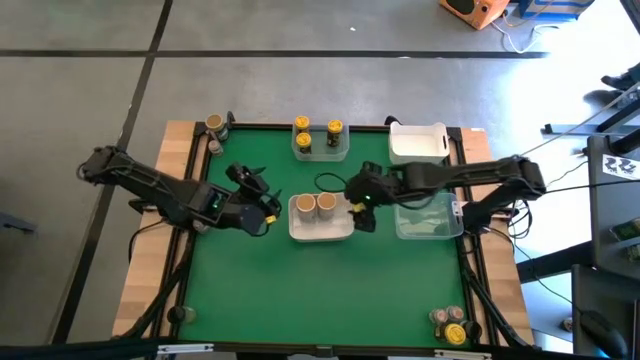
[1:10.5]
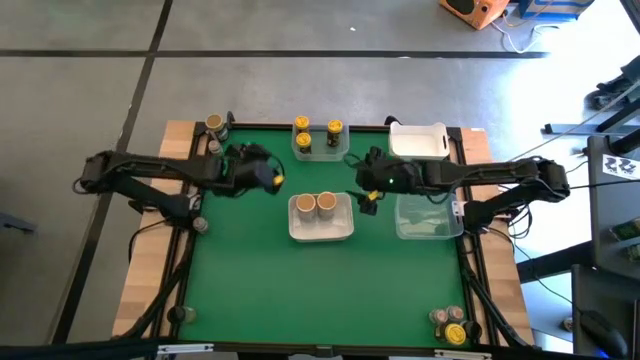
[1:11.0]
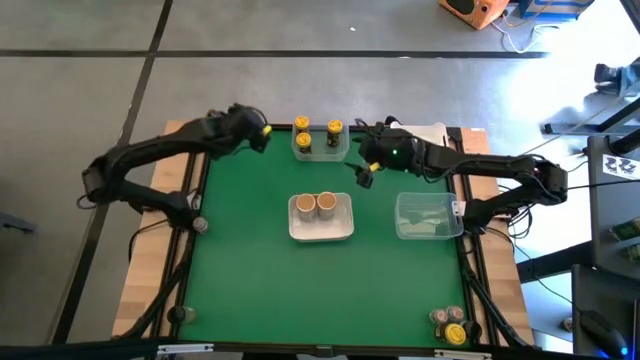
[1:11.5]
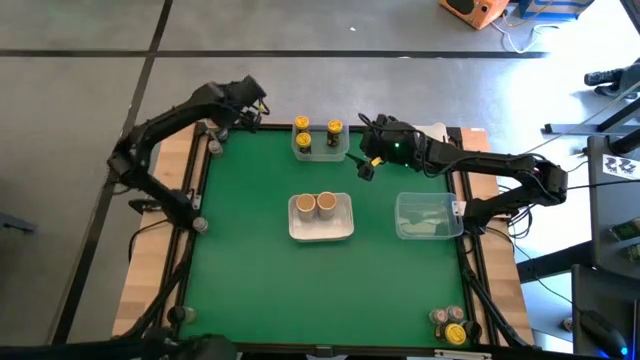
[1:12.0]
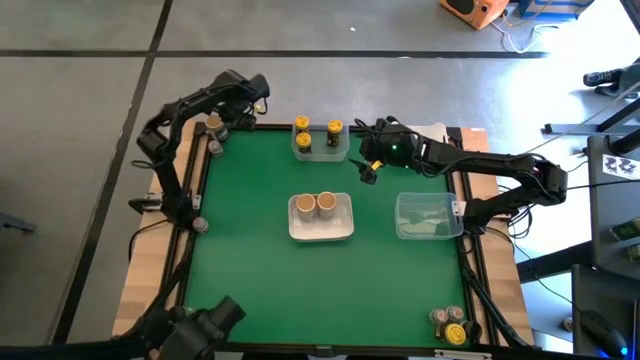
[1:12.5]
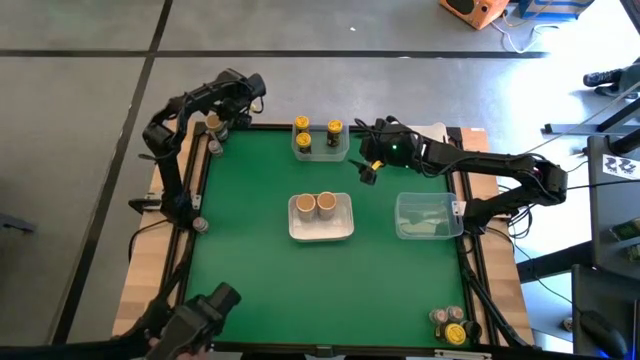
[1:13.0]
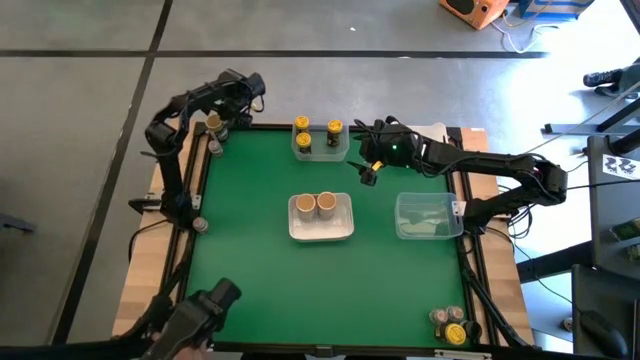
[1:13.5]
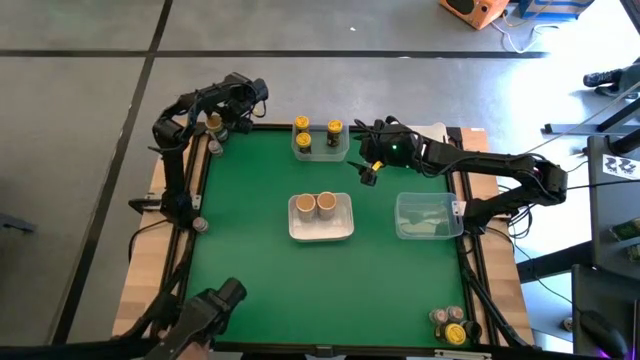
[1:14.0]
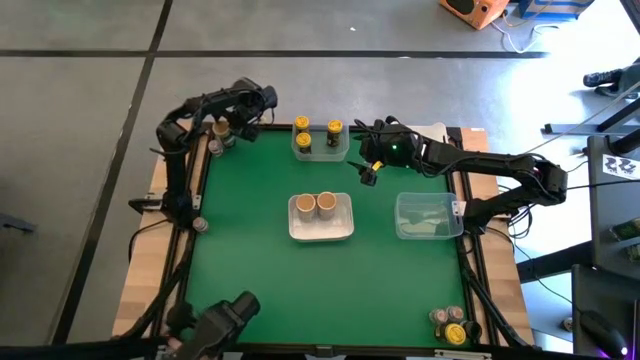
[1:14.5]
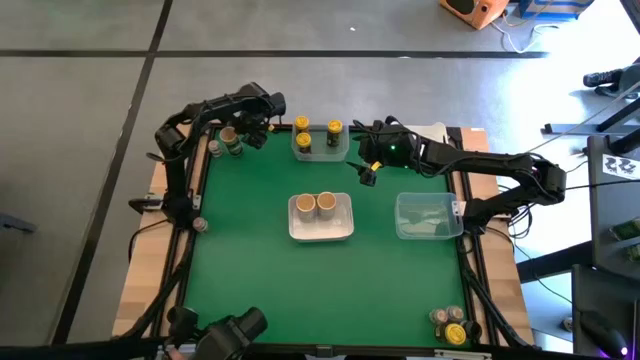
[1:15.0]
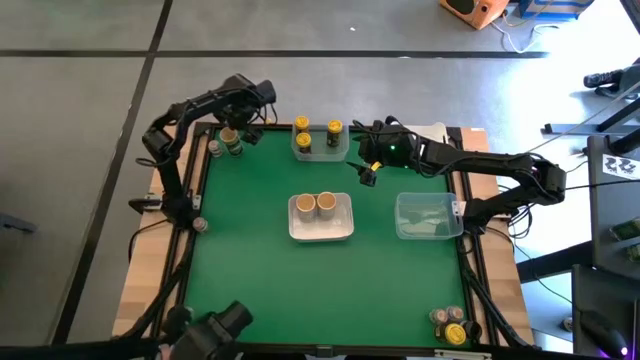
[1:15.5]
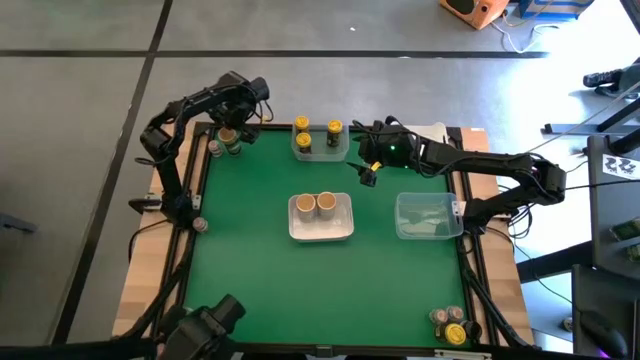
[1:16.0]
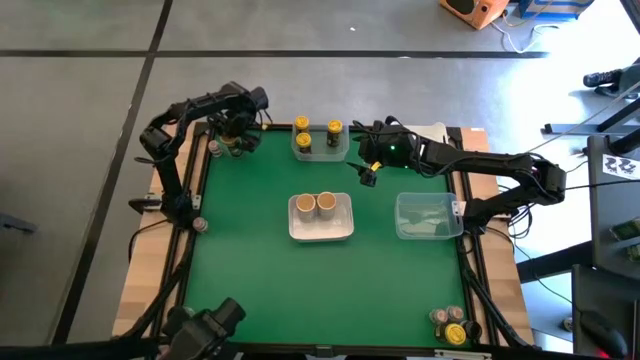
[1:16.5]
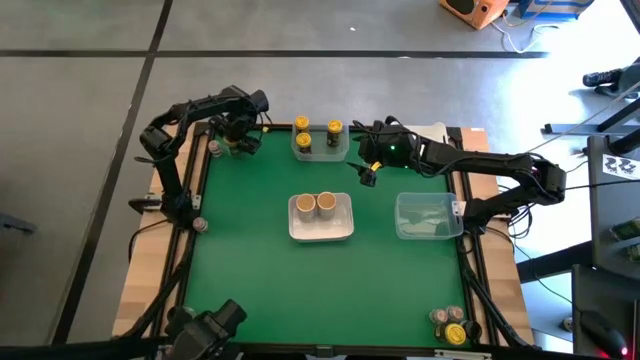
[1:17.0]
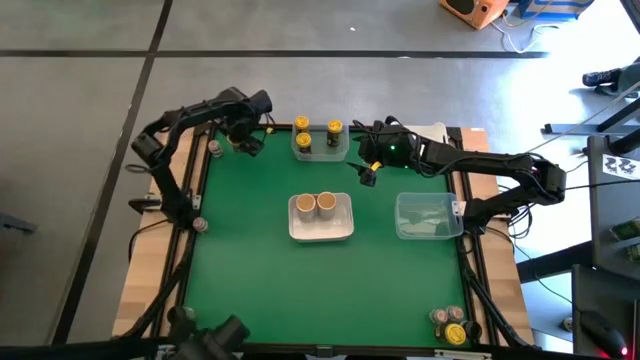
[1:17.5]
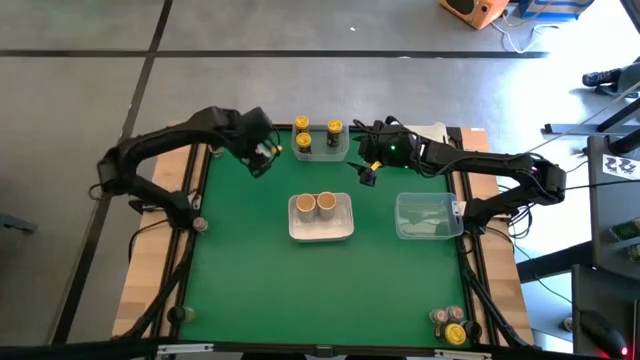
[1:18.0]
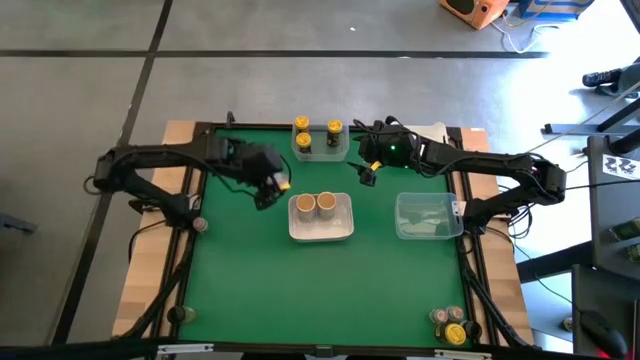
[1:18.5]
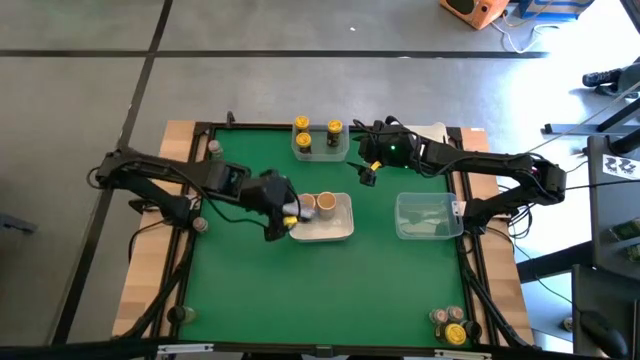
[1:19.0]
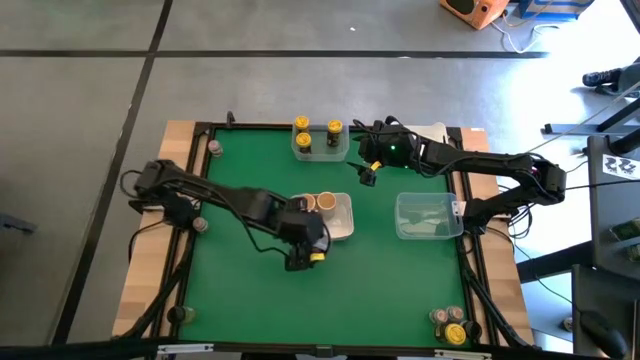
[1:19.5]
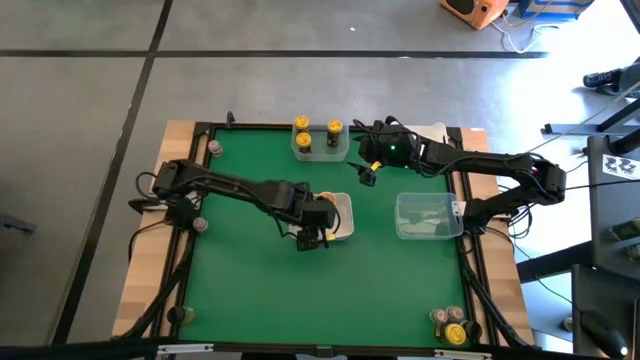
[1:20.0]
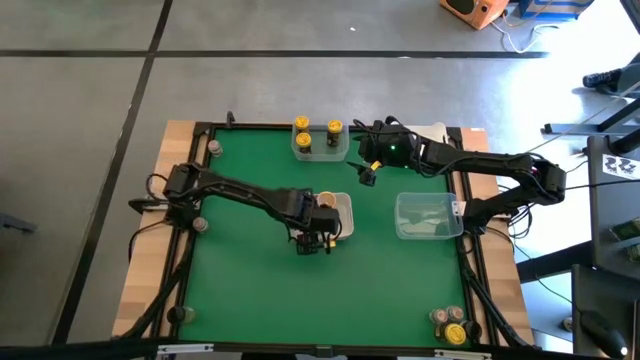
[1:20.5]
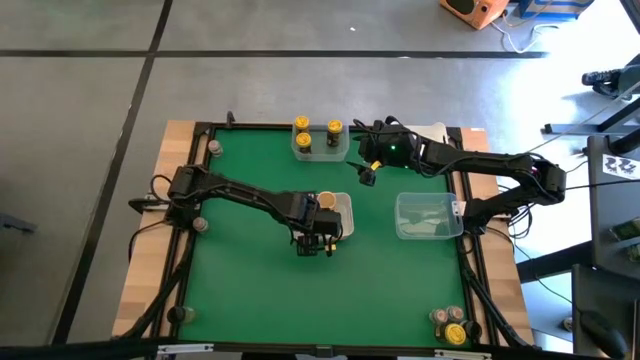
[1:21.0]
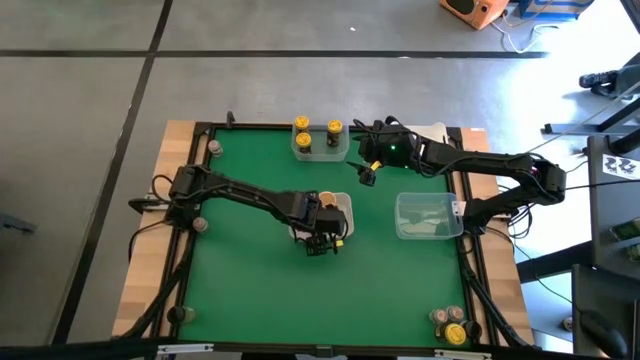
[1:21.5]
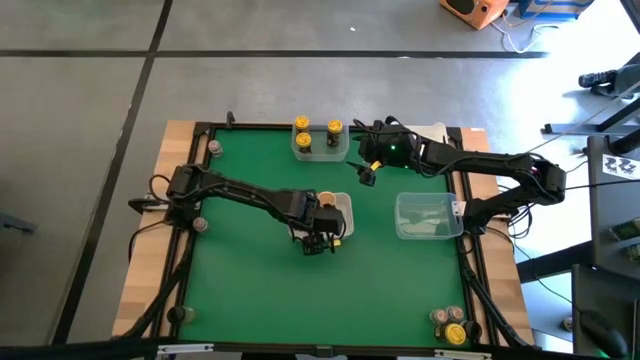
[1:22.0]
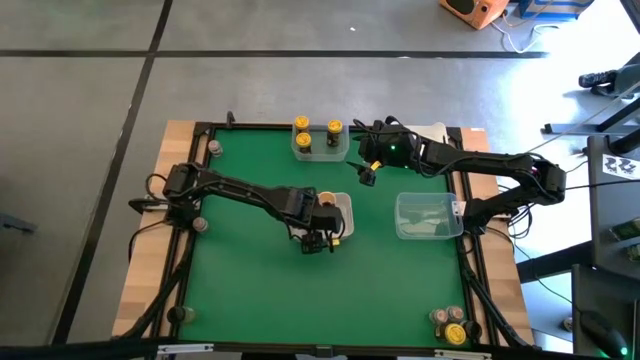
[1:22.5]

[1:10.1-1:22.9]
Task: Sort spices by type
Put the gold seasoning bottle into the bottom white bin

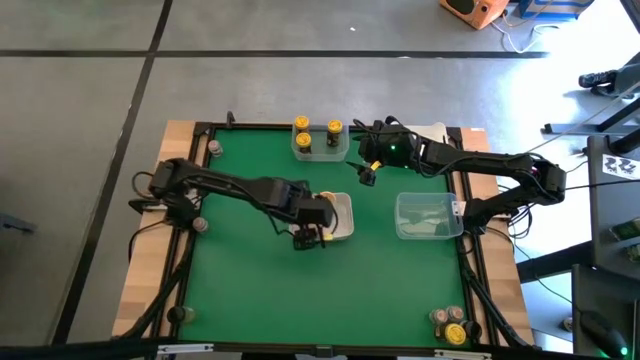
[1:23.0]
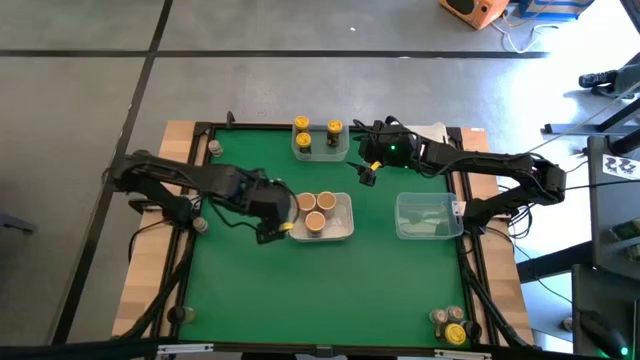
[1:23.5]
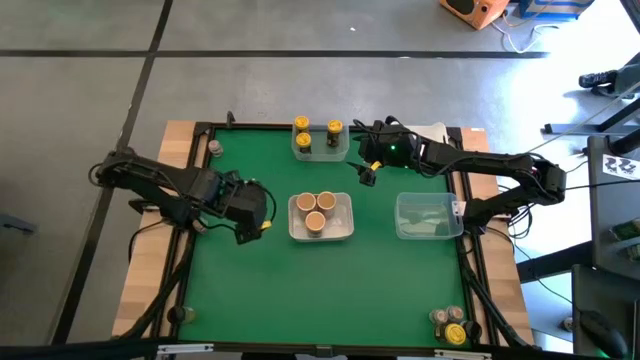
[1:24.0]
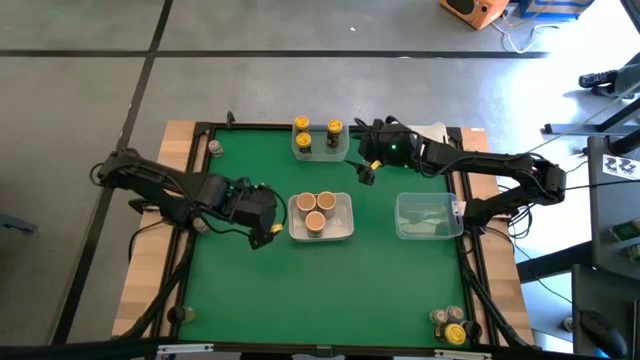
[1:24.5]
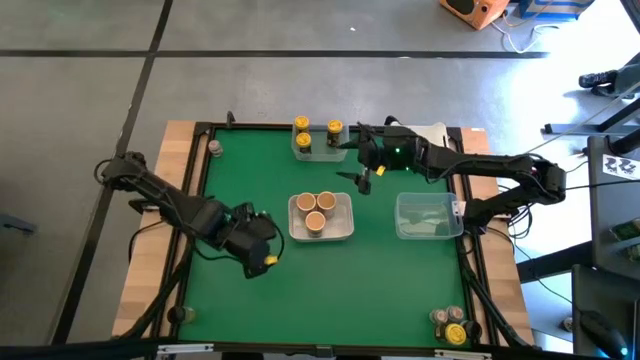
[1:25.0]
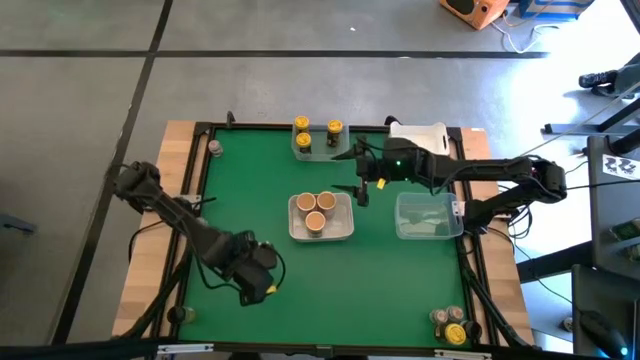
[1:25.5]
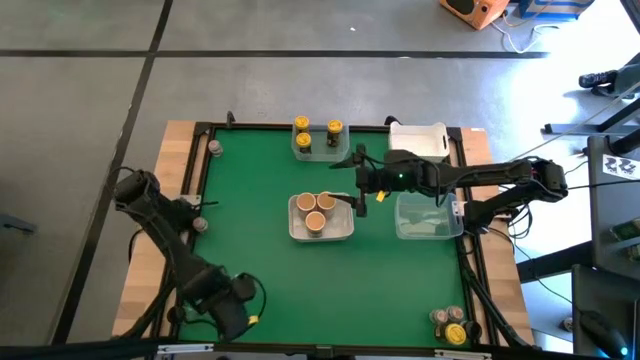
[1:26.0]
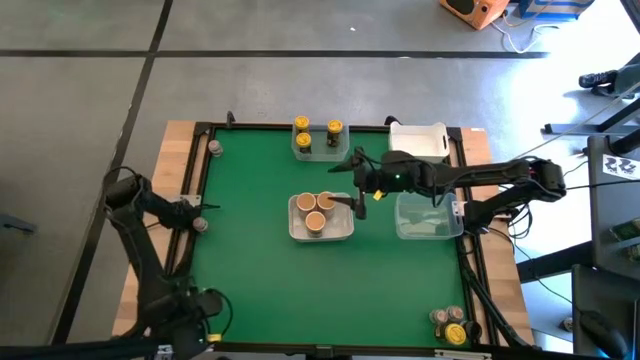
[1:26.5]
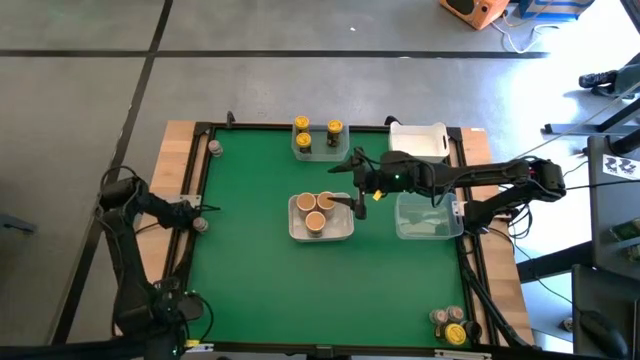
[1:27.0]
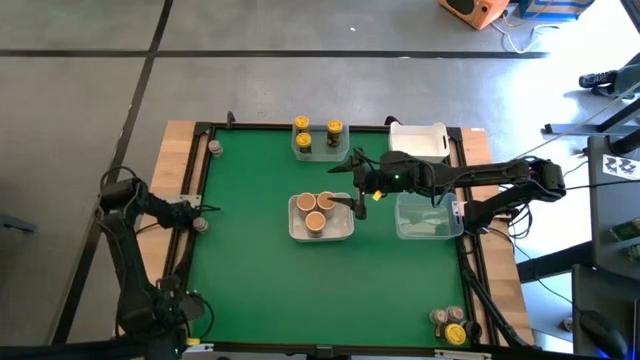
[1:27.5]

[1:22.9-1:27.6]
Put the left black seasoning bottle into the top white bin

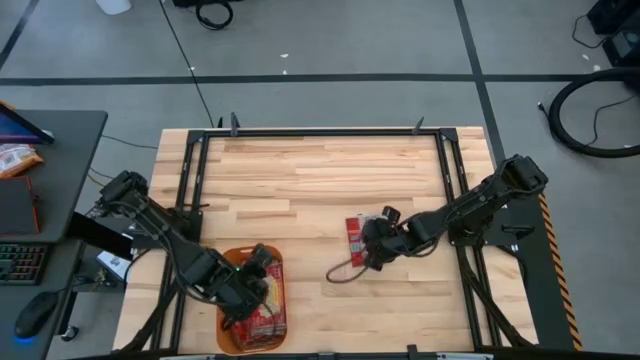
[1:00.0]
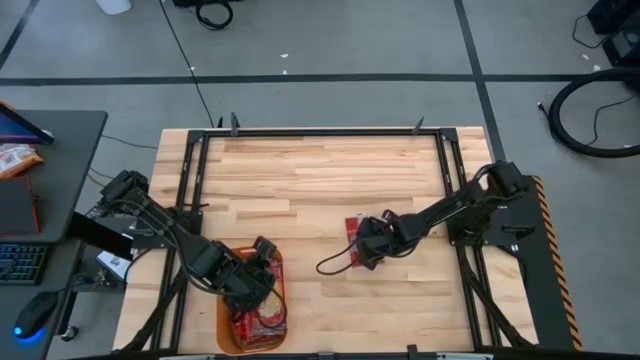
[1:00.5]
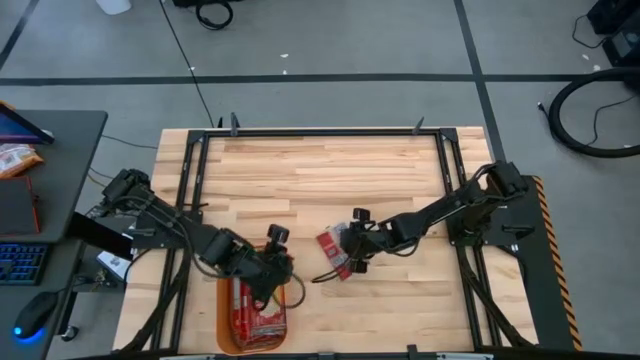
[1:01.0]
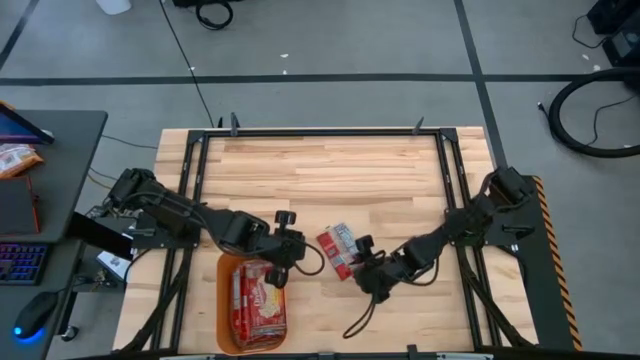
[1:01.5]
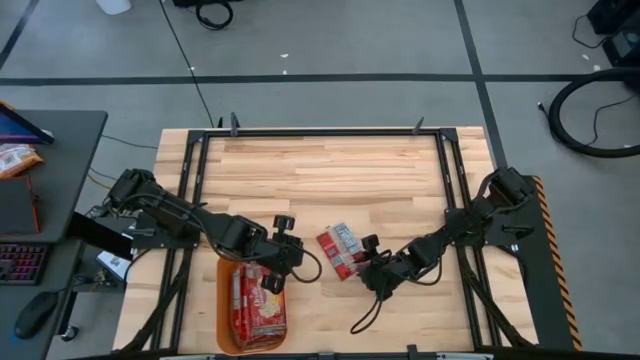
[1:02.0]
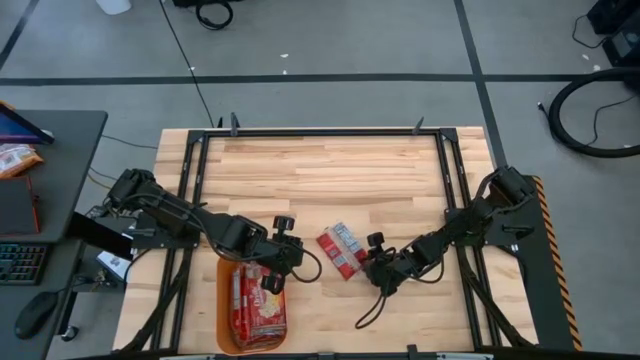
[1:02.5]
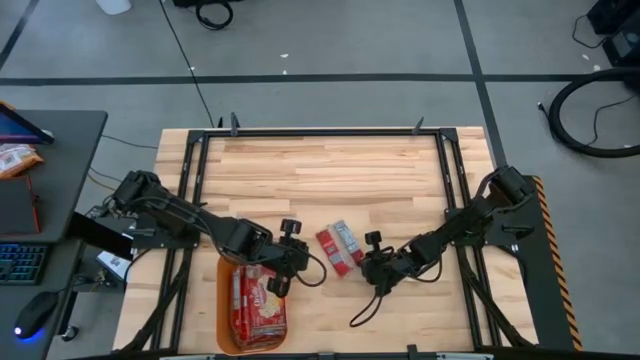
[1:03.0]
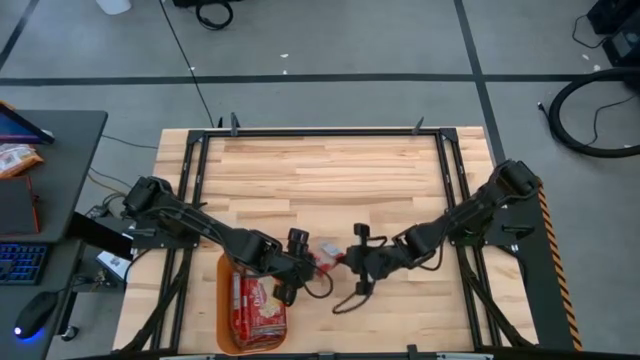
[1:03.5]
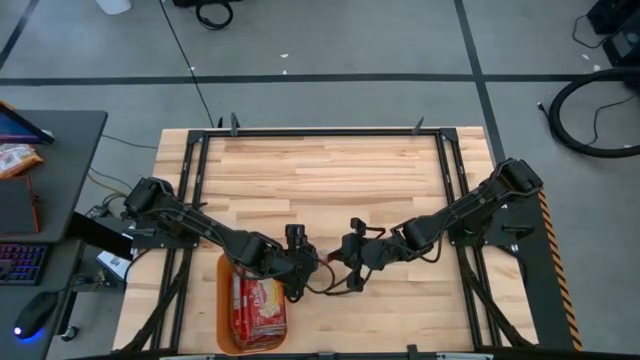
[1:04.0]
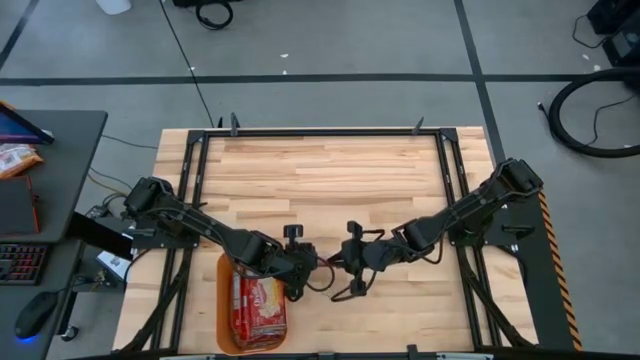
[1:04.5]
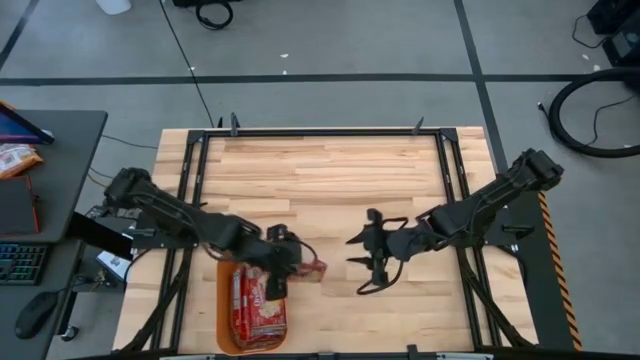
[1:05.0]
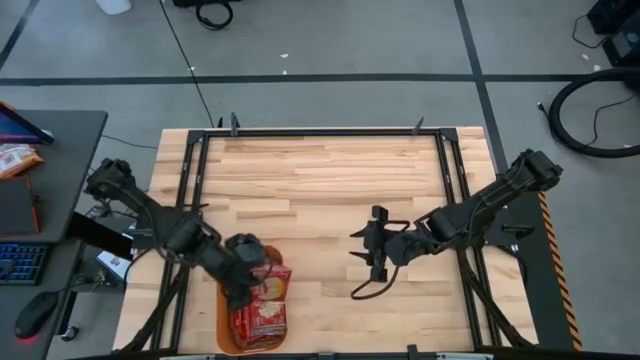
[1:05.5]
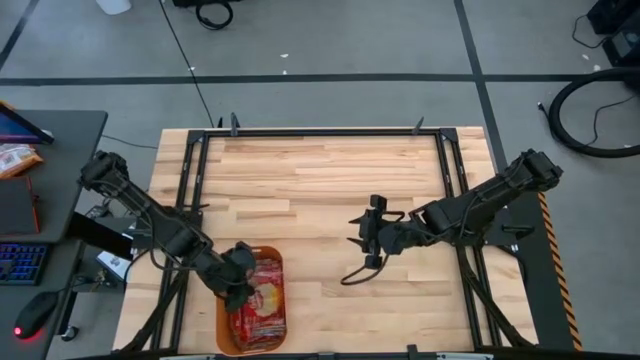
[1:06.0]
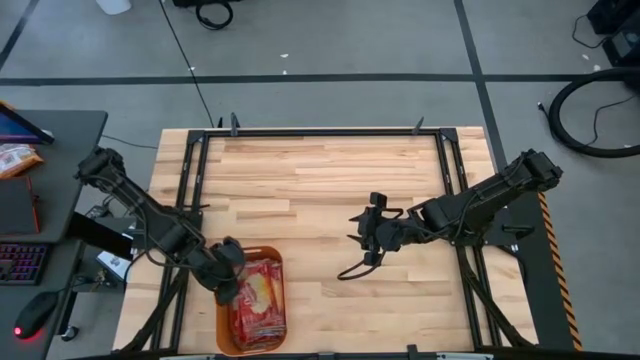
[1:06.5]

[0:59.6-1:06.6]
Task: Sort popcorn bags into baskets
Put the red popcorn pack into the orange bin
